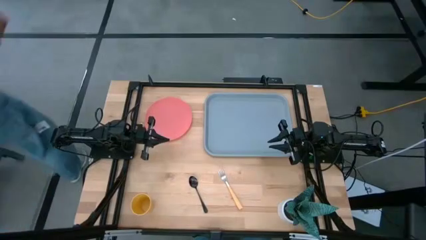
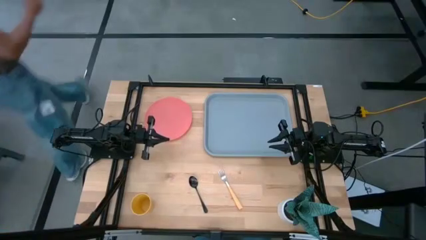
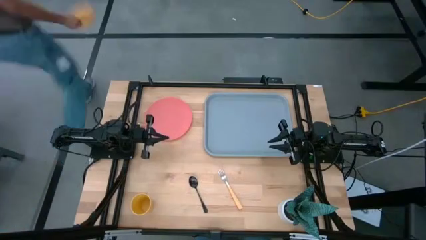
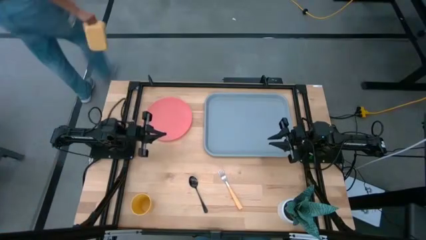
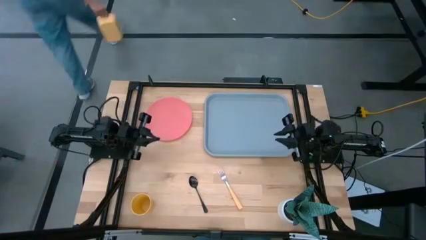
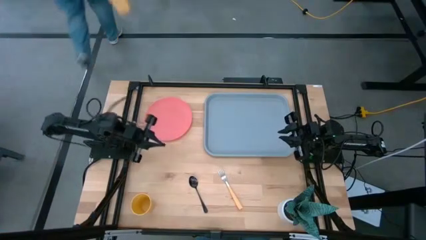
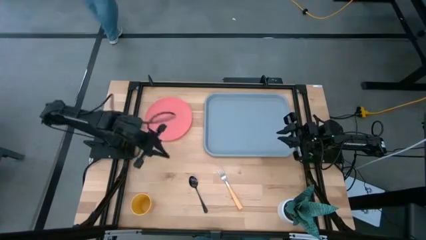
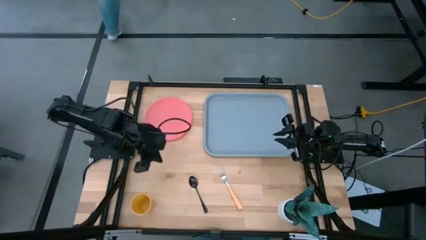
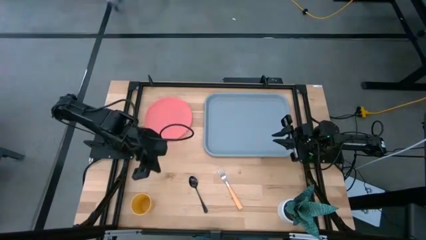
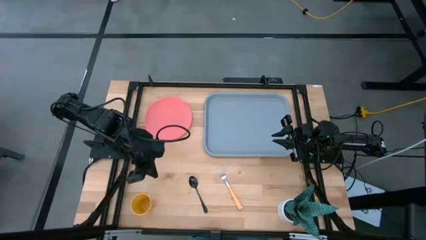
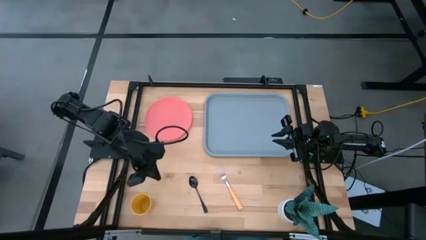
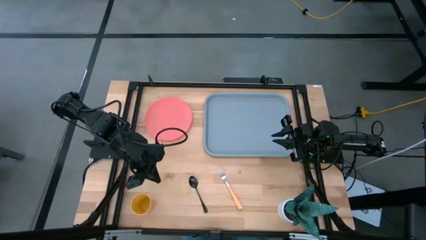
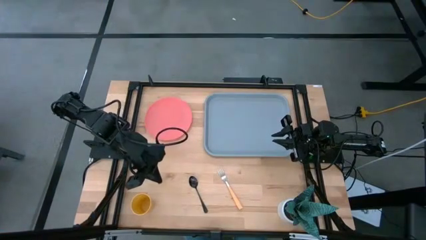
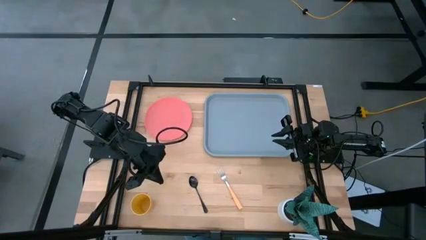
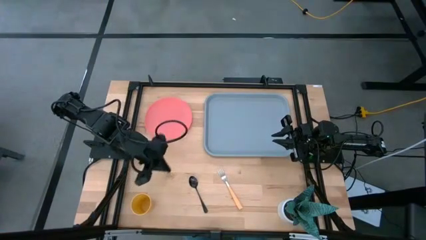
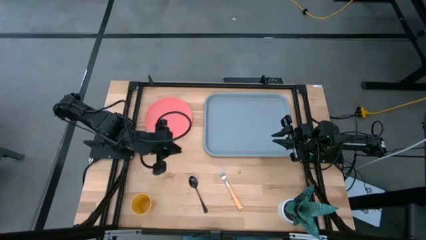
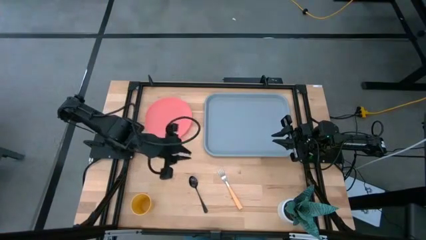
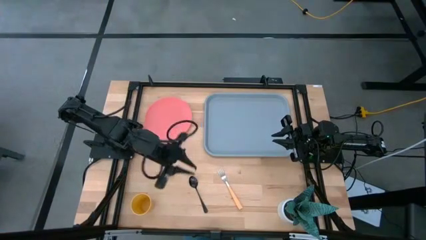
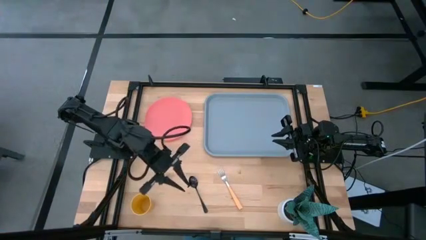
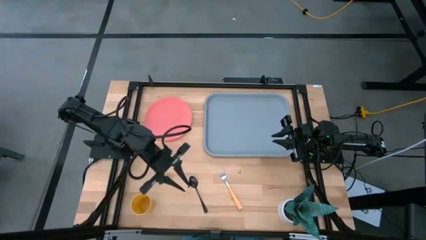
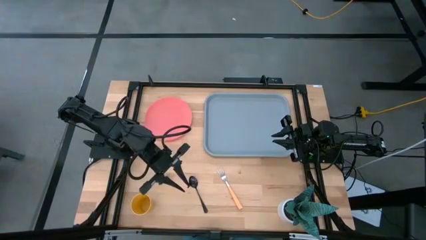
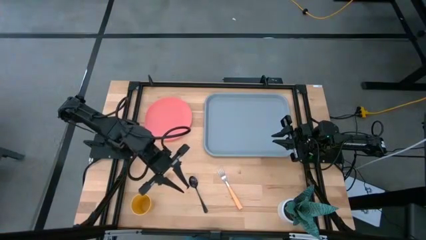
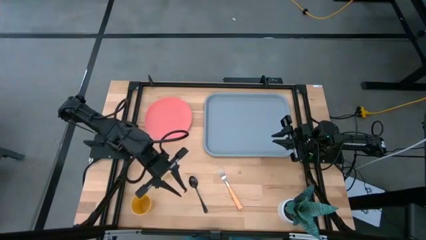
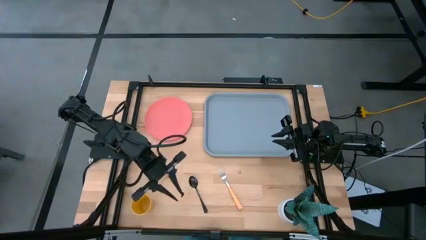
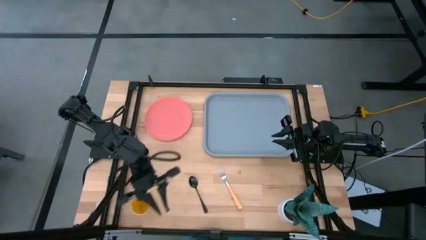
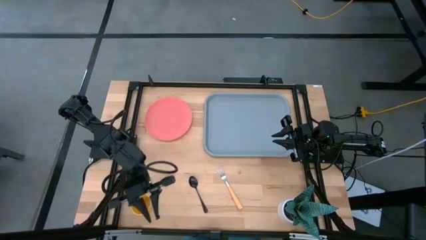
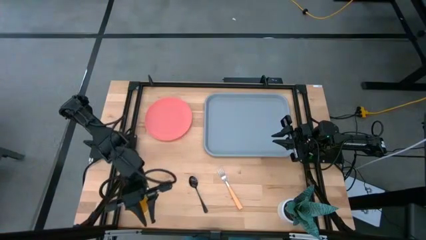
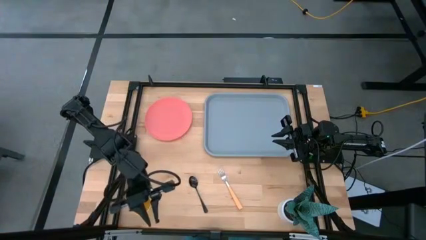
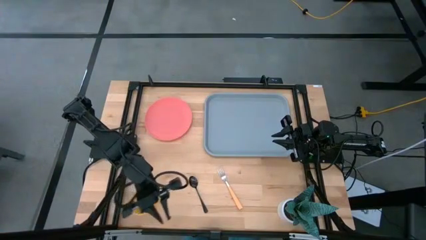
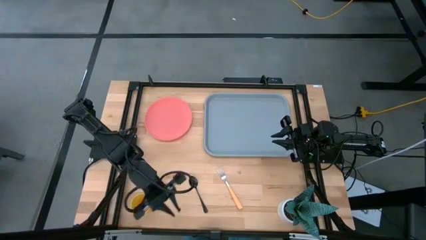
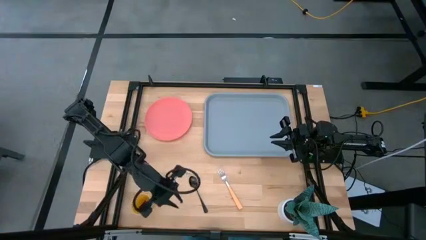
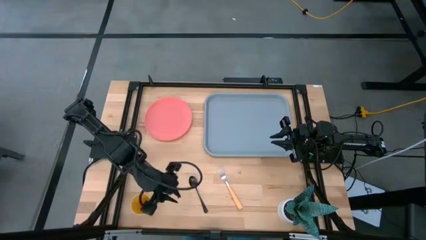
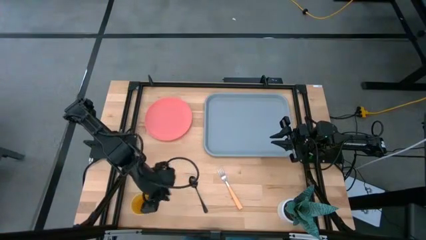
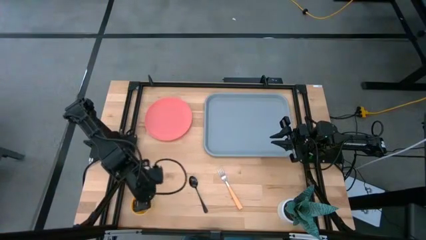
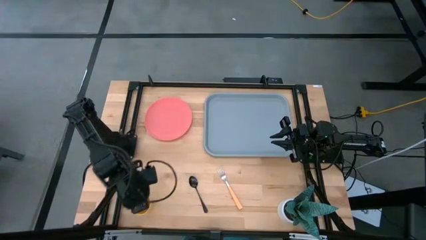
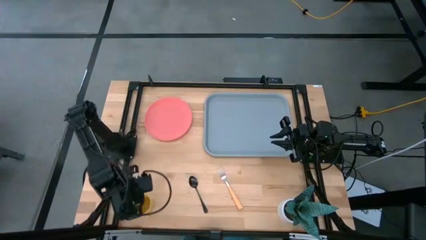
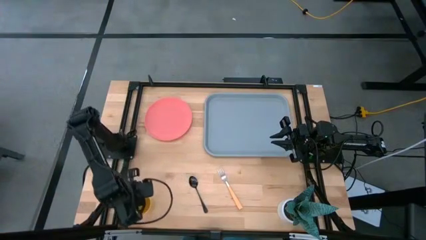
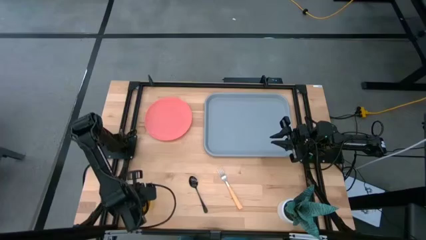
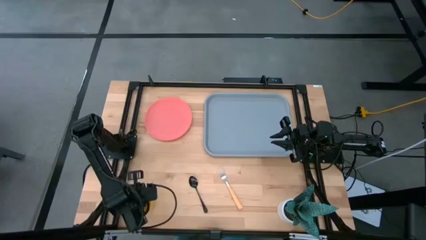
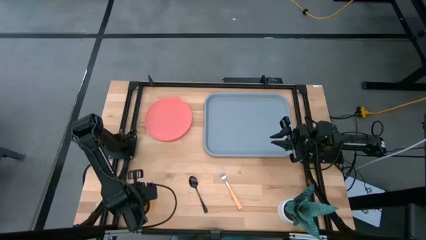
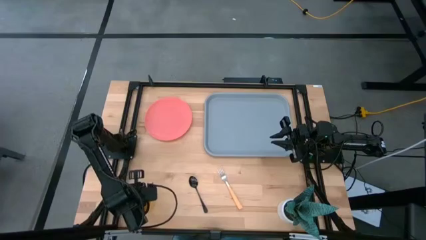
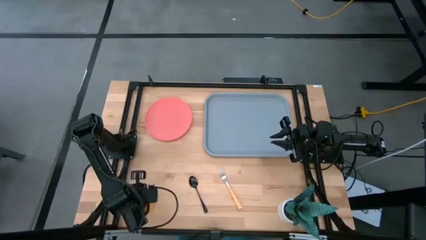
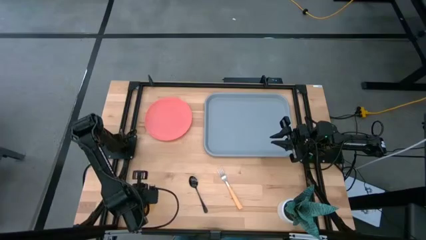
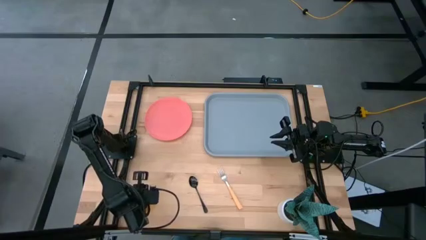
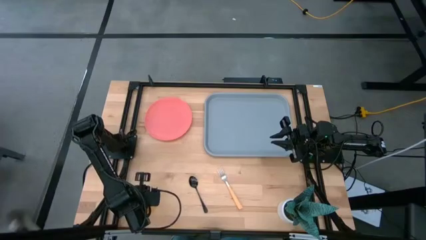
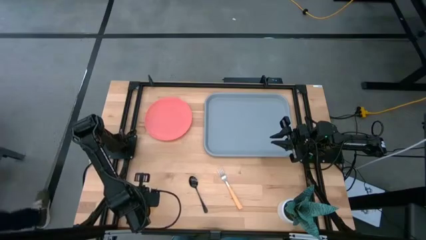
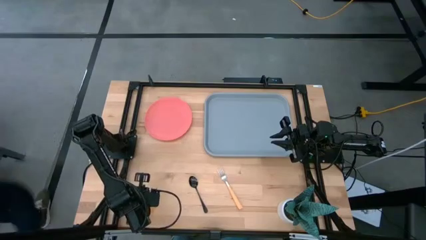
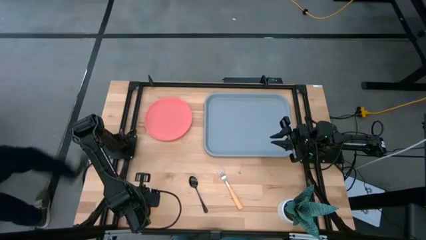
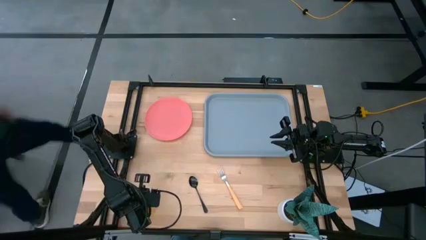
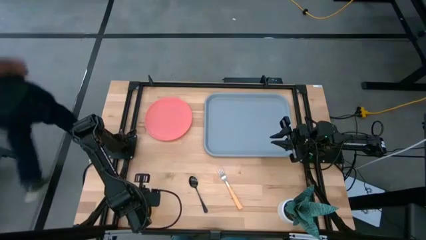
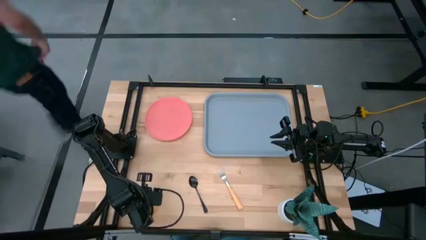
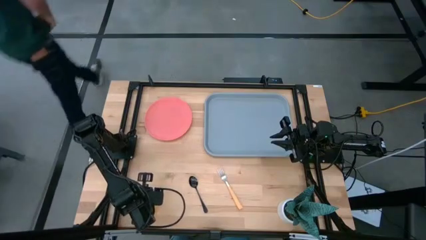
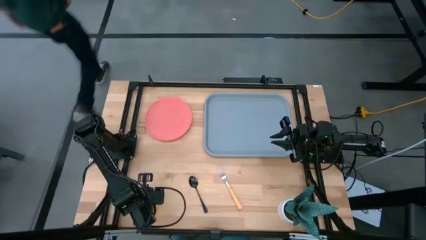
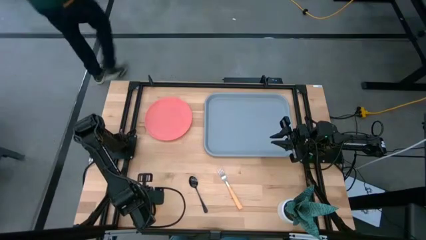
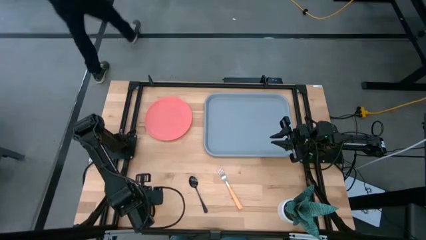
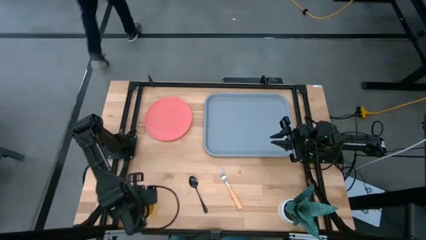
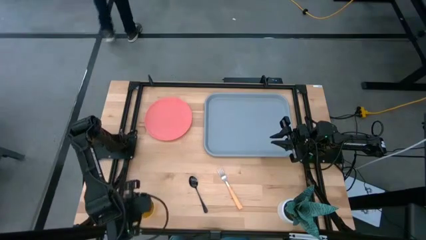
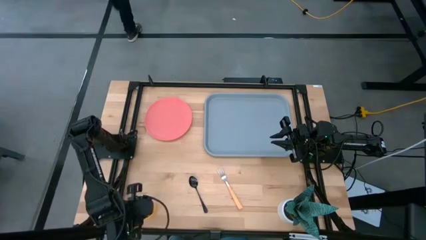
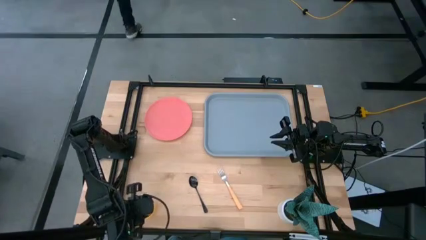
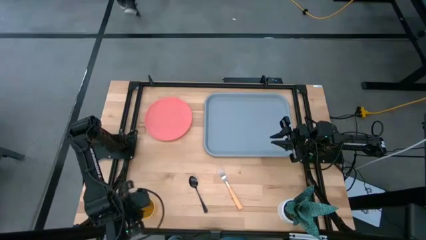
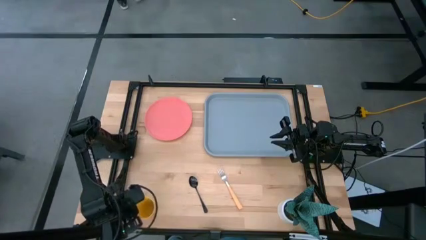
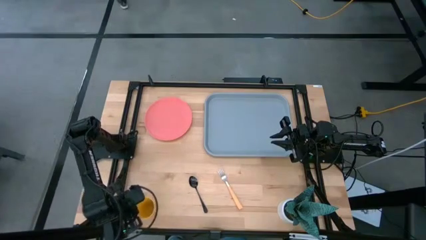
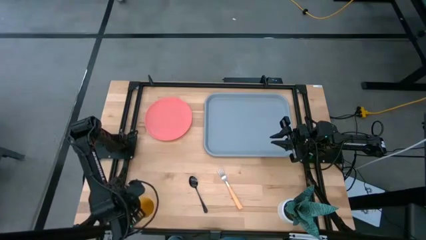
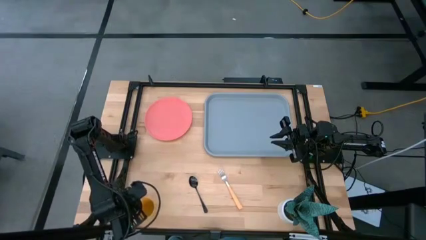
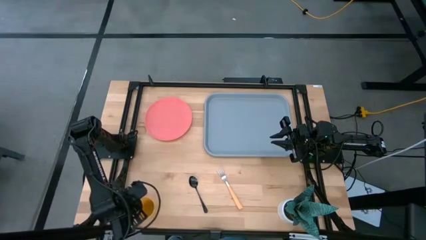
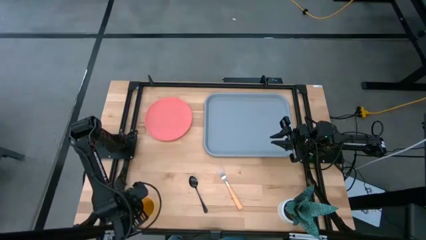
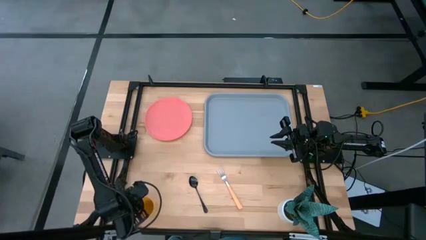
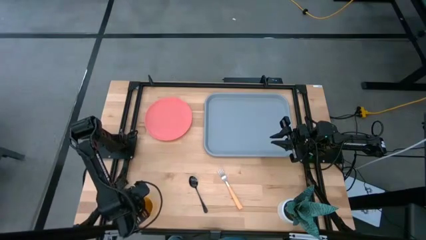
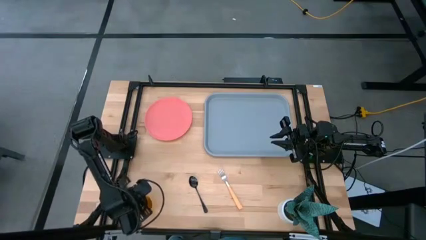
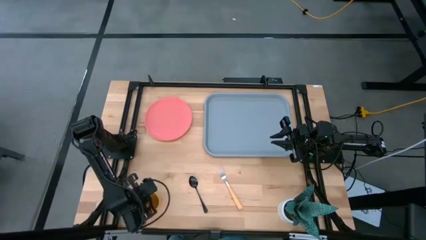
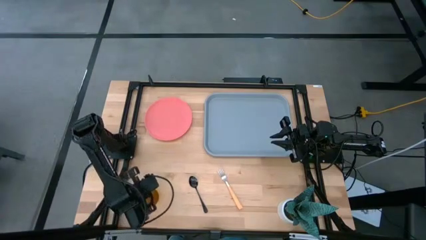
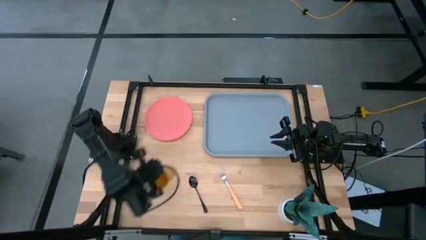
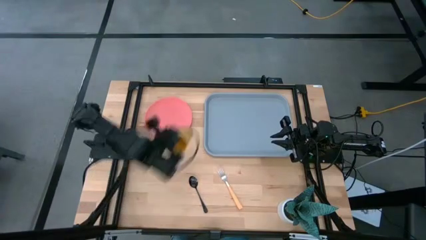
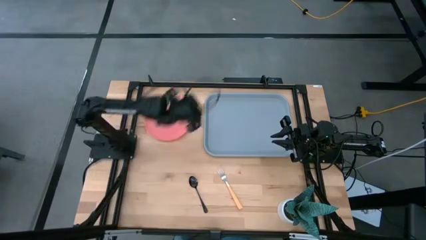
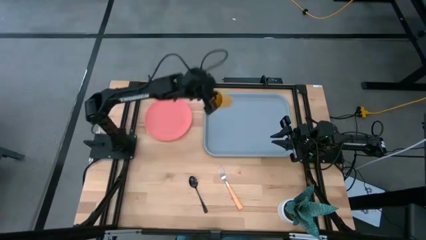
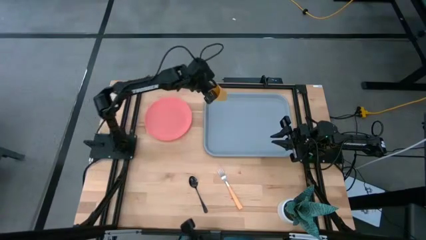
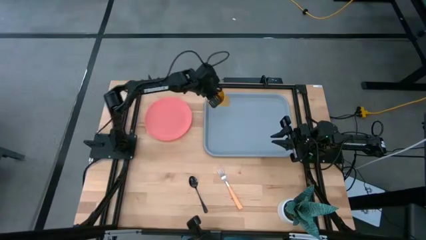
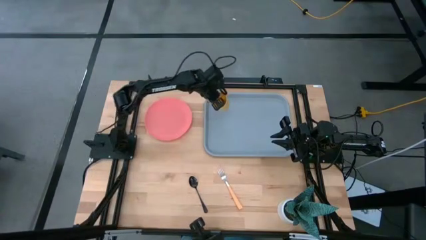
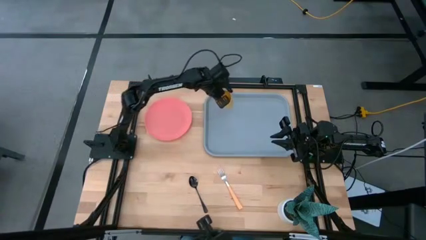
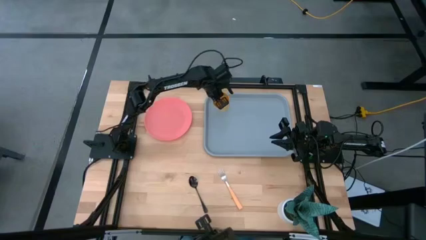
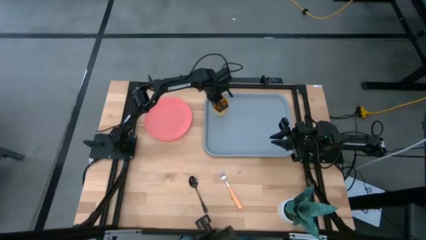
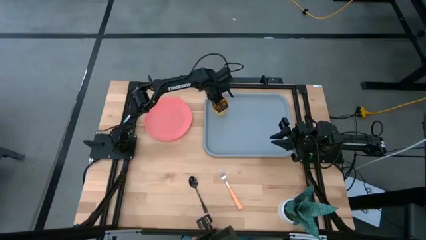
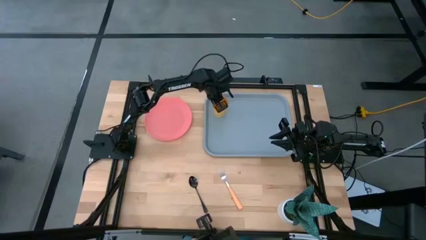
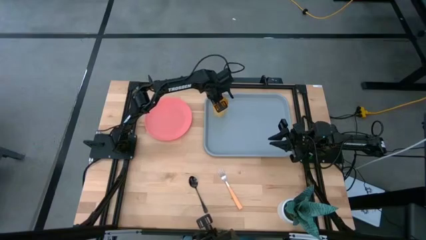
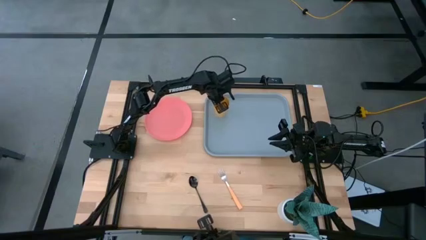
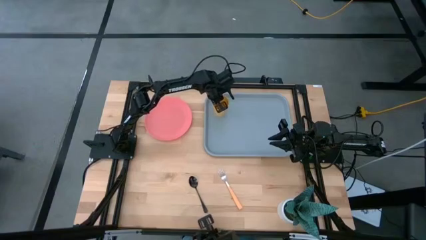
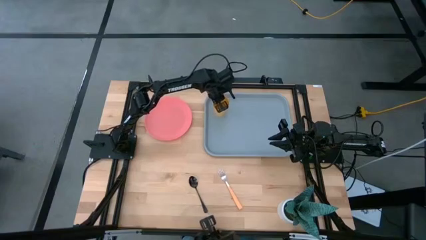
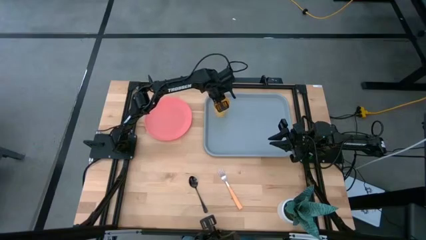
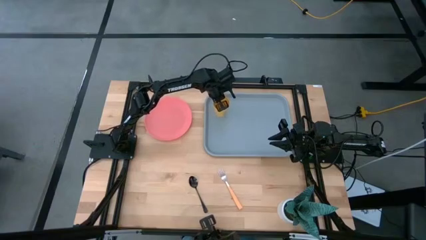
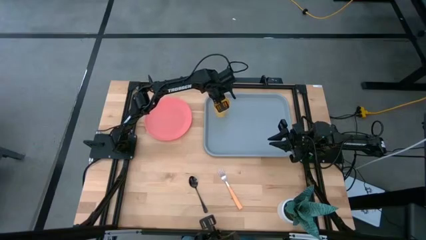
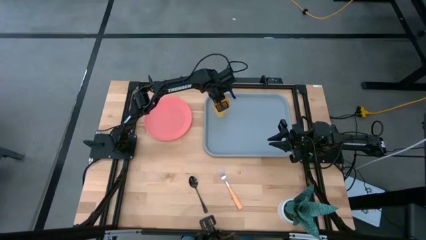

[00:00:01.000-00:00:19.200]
Task: Pick and place plate/cup/fork/spoon on tray
Put the yellow cup on the top left corner of the gray tray
